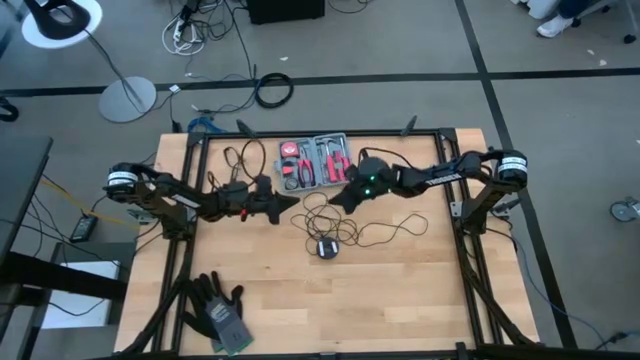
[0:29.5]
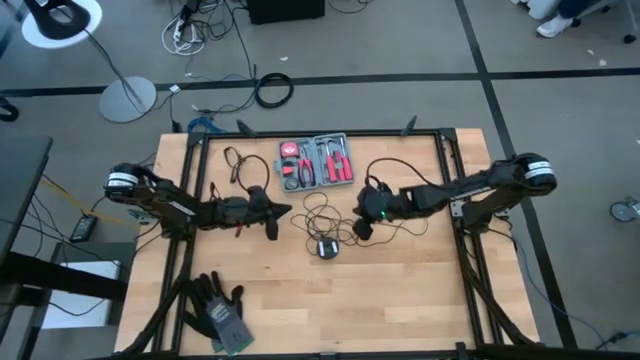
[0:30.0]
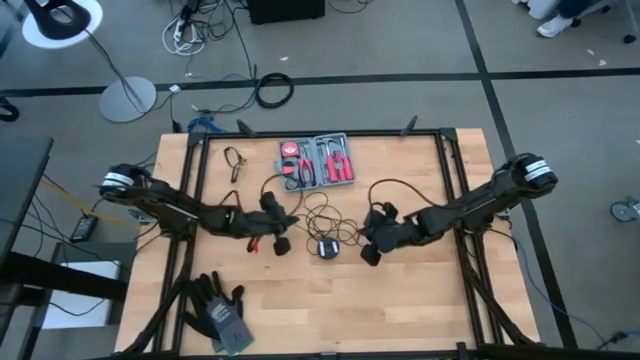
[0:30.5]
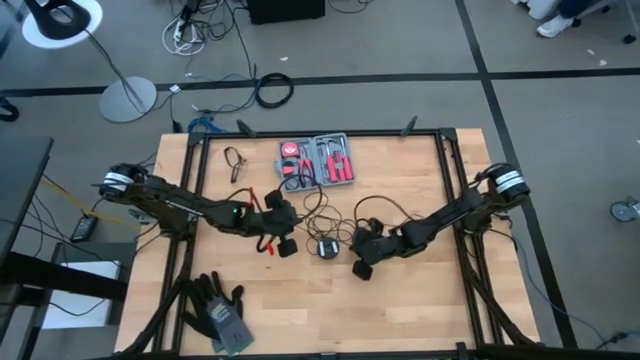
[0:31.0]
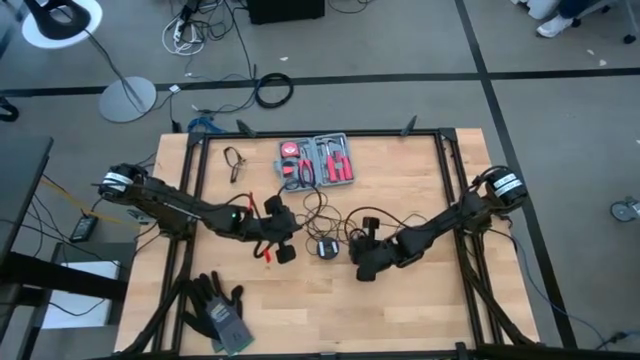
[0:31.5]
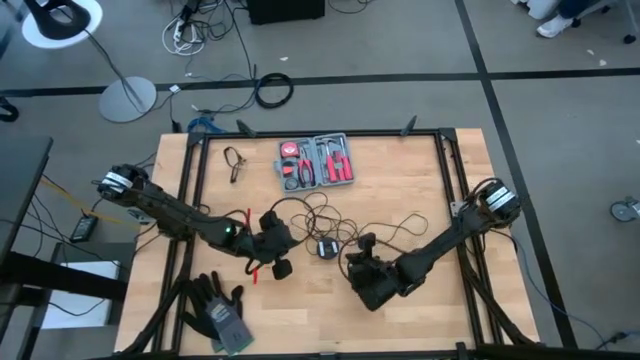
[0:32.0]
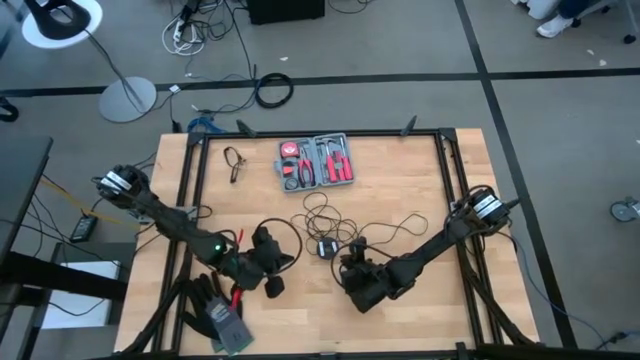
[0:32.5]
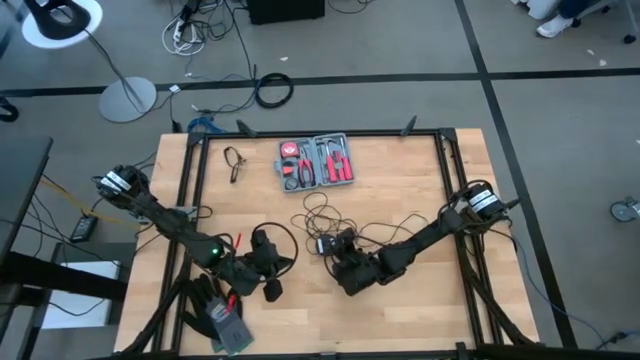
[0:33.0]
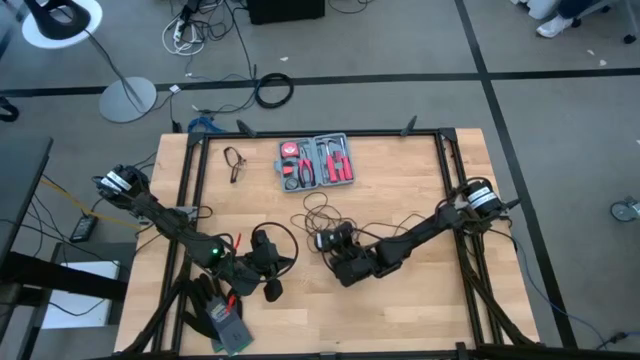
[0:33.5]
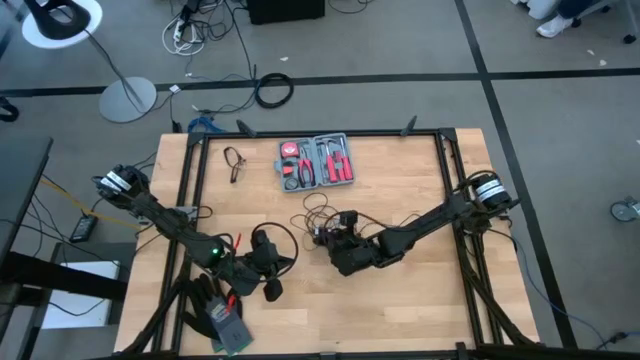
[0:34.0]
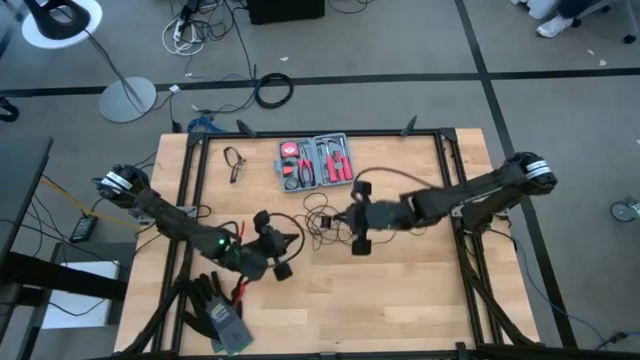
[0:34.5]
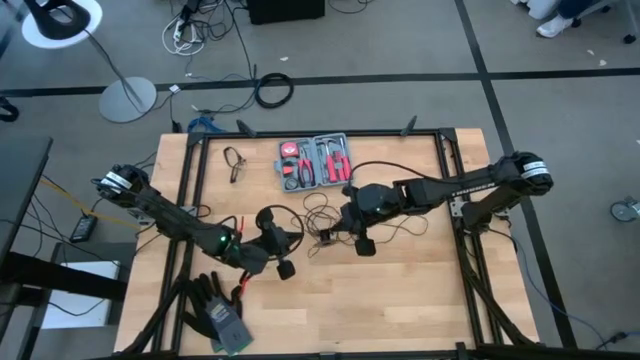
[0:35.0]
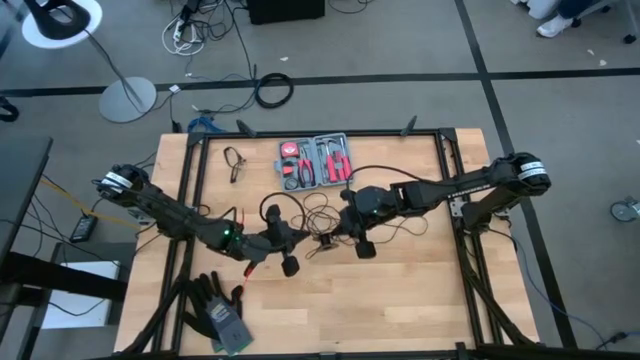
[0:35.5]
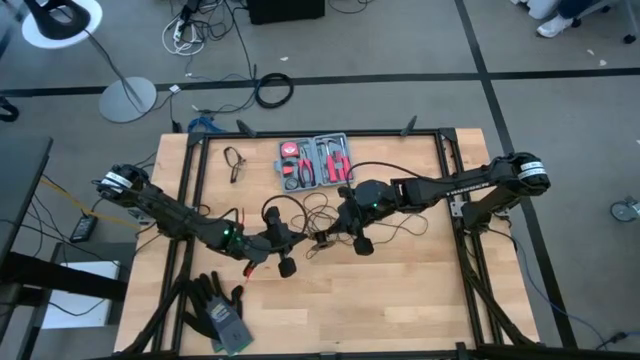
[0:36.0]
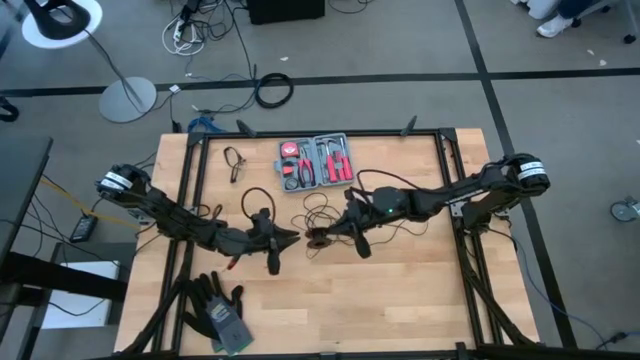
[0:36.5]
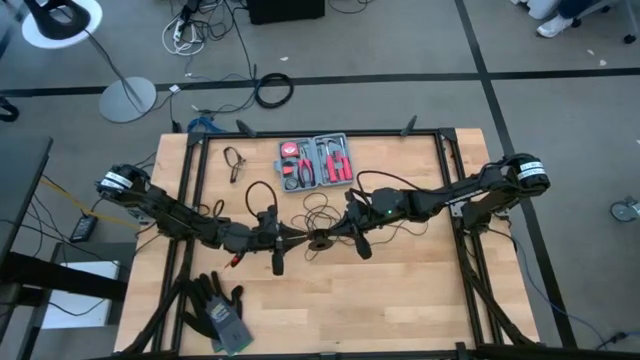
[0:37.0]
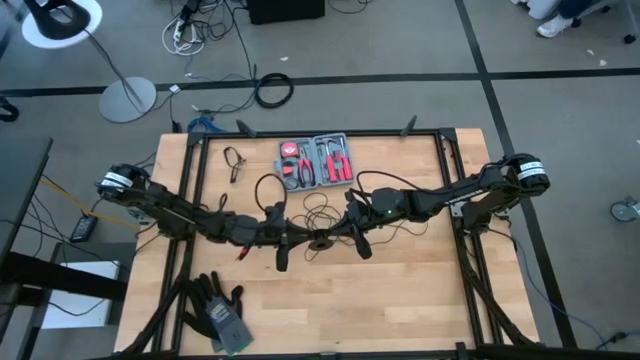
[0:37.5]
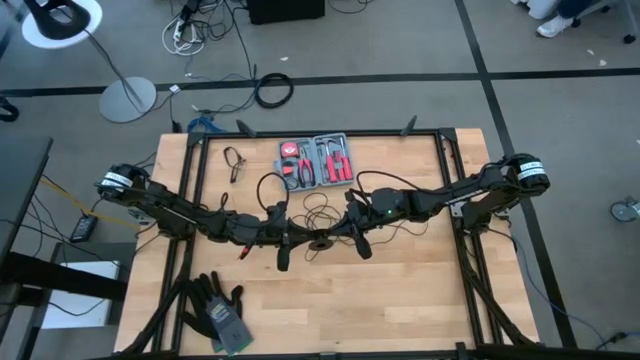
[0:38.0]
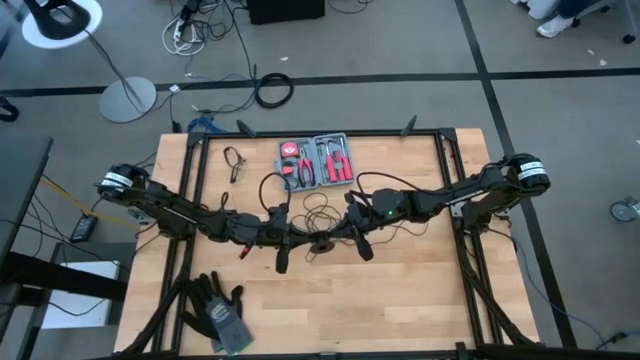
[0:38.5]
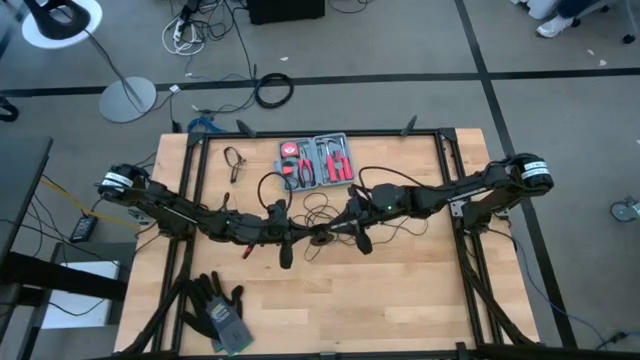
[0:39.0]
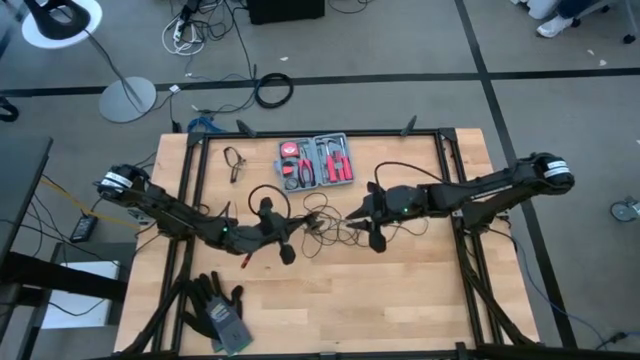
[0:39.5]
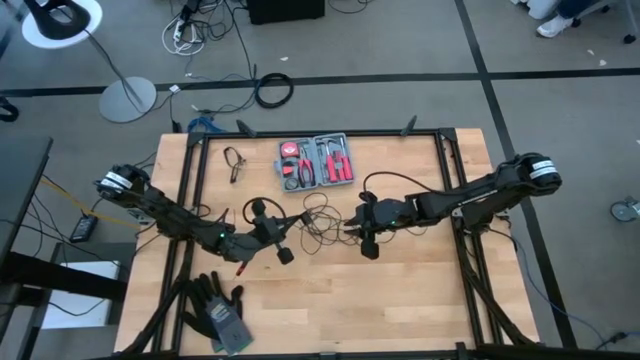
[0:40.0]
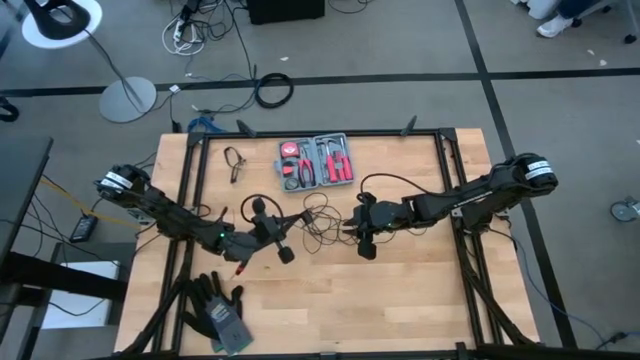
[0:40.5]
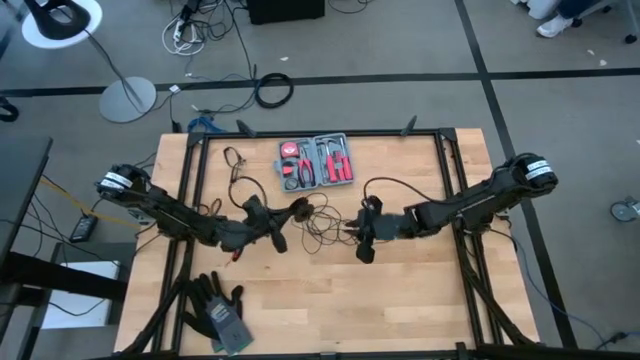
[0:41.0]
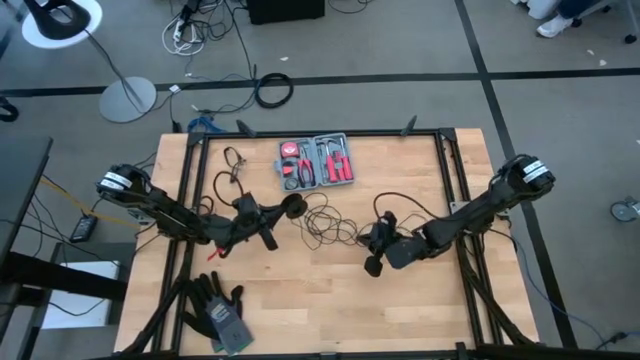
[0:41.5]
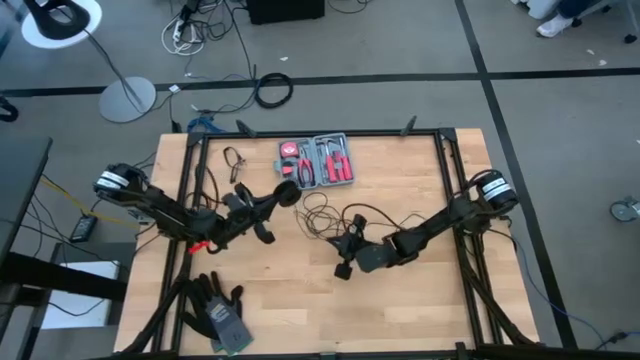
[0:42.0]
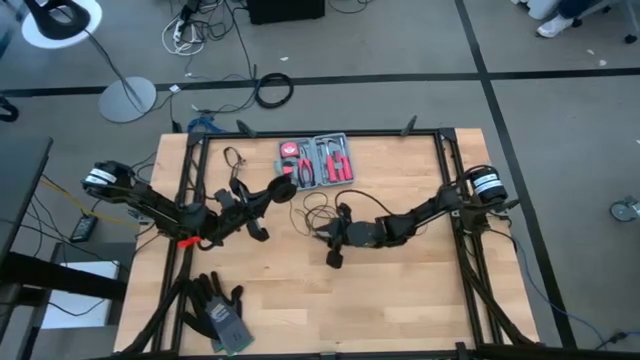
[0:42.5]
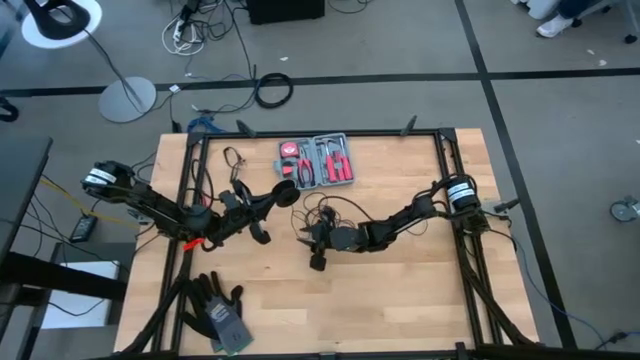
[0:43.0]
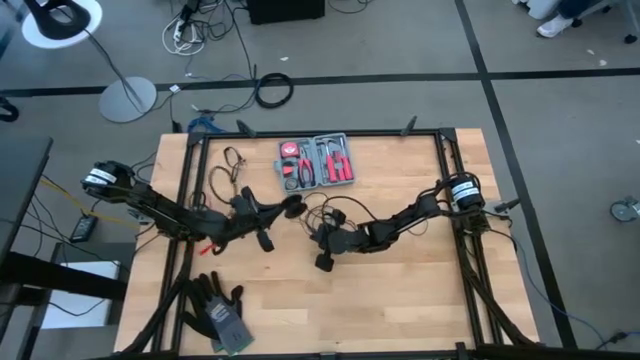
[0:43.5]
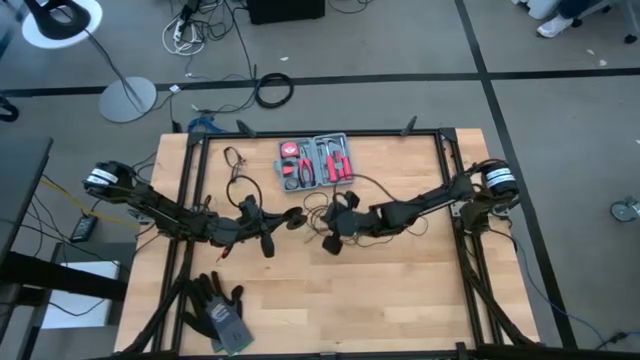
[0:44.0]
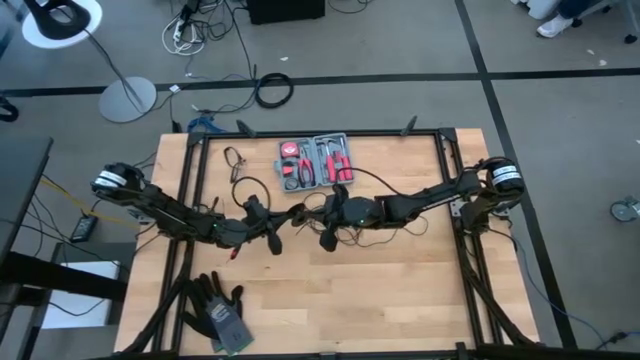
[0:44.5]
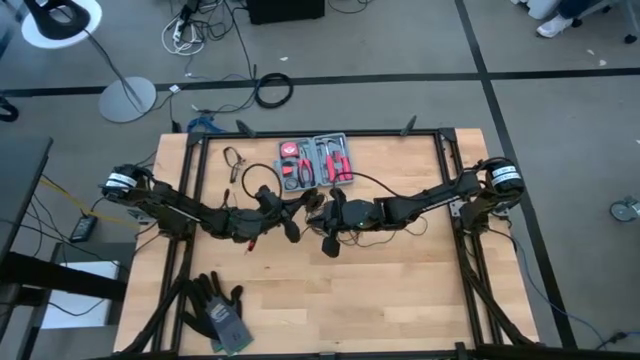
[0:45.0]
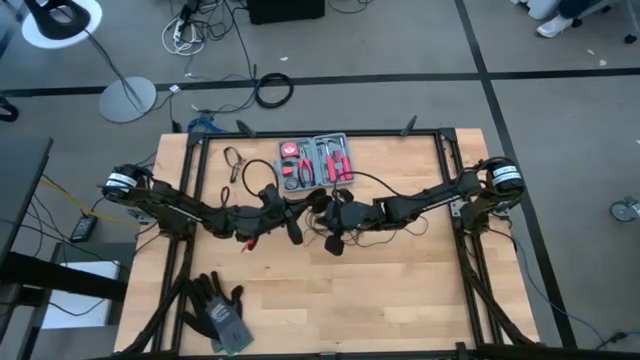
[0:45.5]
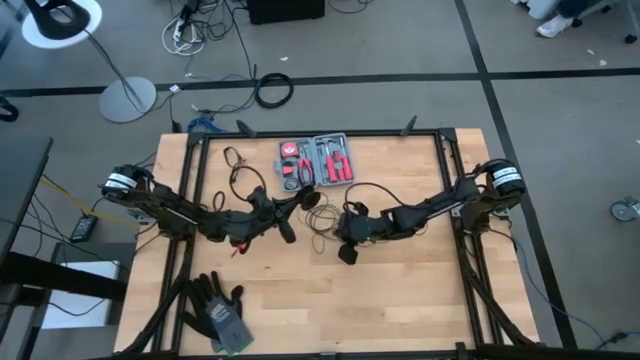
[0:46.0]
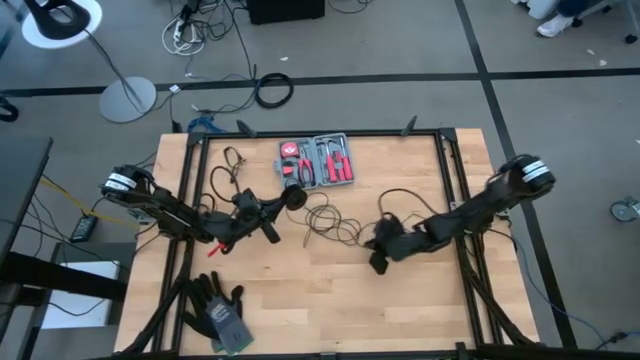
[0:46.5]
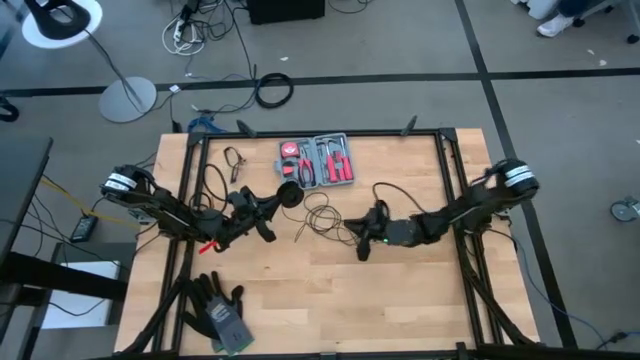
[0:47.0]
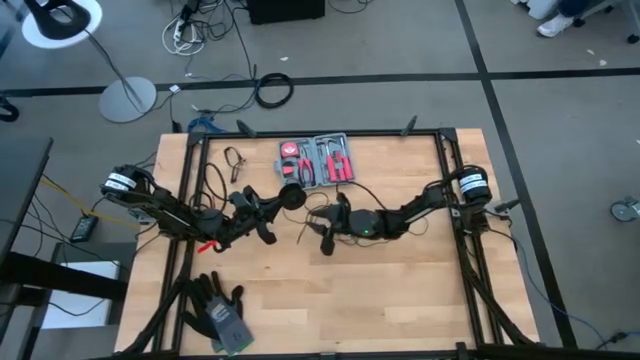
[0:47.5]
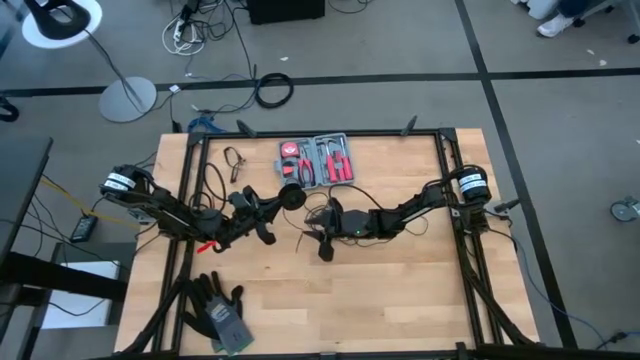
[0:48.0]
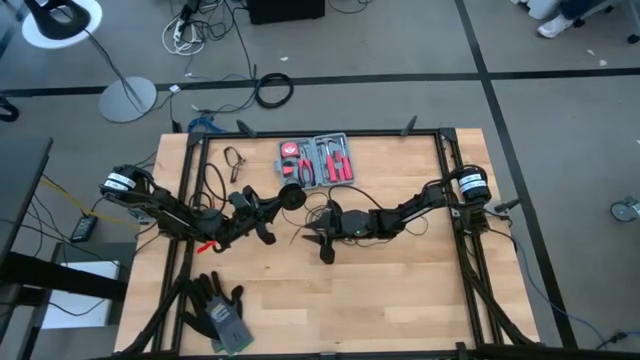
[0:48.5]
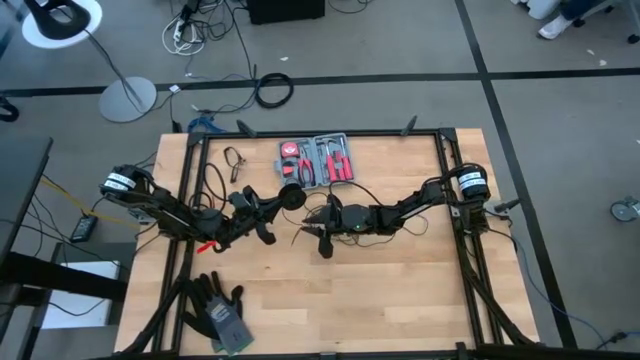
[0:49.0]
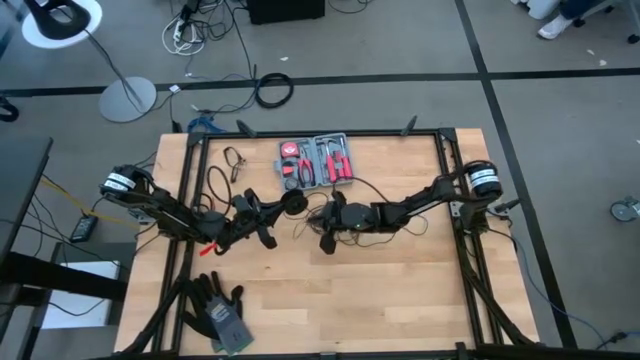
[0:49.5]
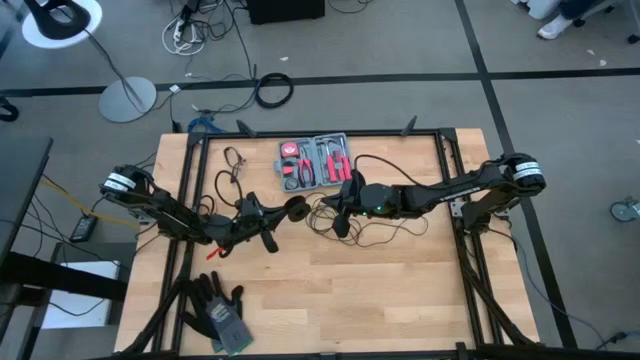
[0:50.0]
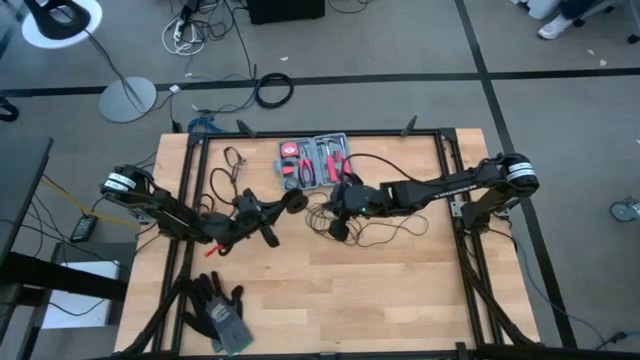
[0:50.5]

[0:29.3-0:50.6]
Task: Coil cords
Coil the black wire onto the black spool
